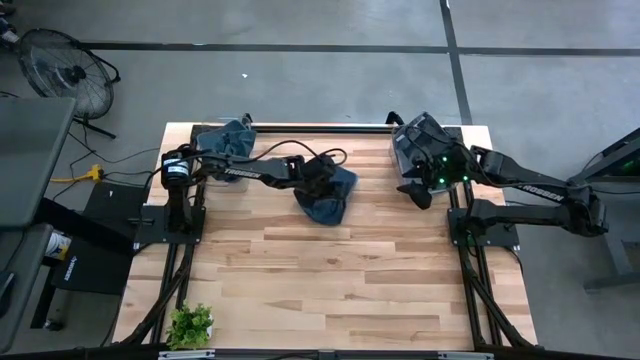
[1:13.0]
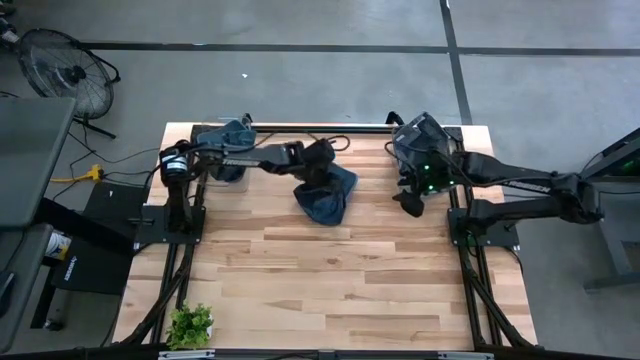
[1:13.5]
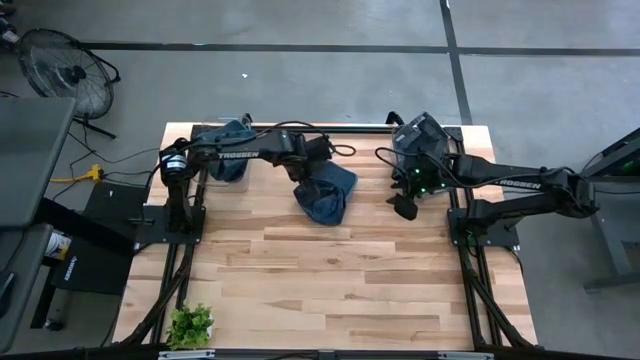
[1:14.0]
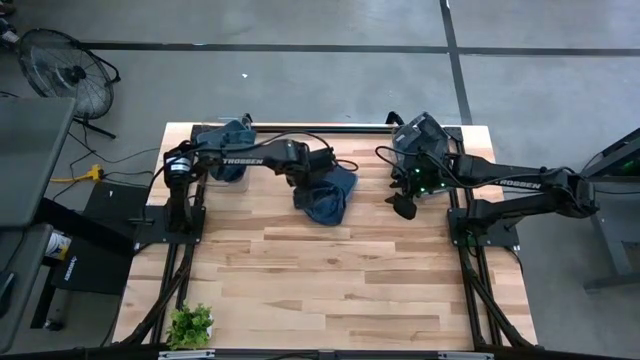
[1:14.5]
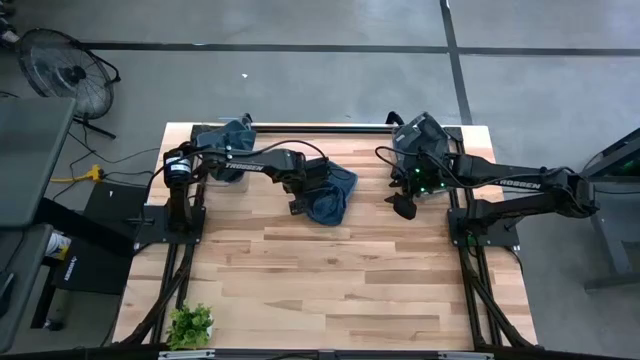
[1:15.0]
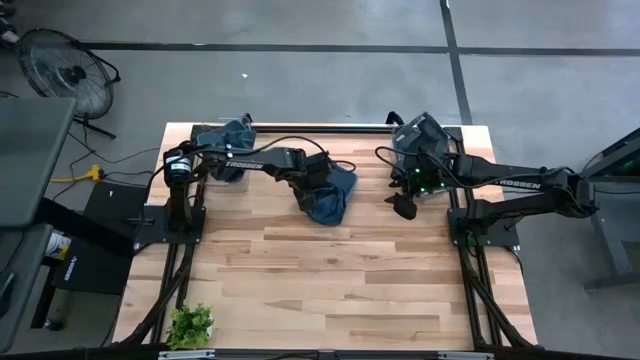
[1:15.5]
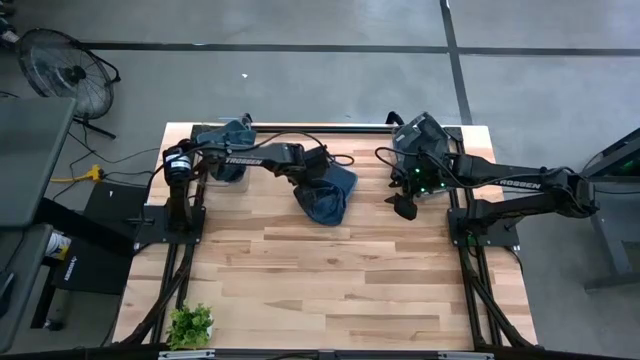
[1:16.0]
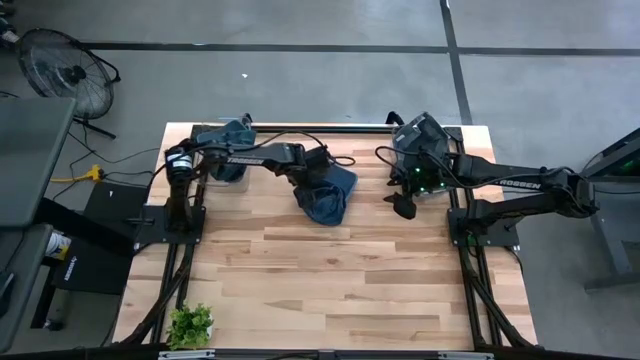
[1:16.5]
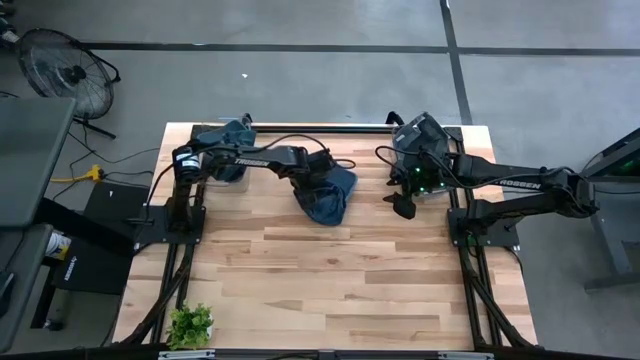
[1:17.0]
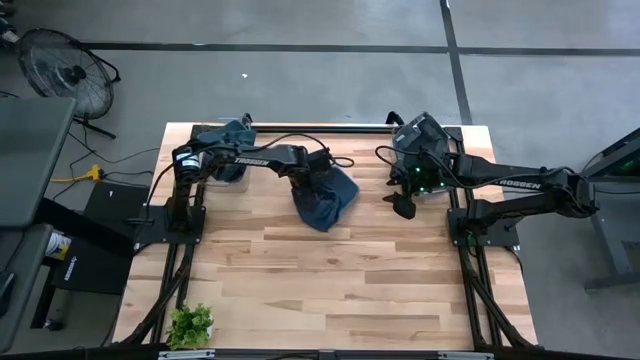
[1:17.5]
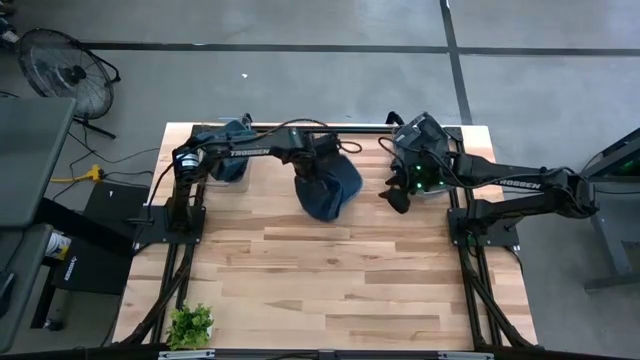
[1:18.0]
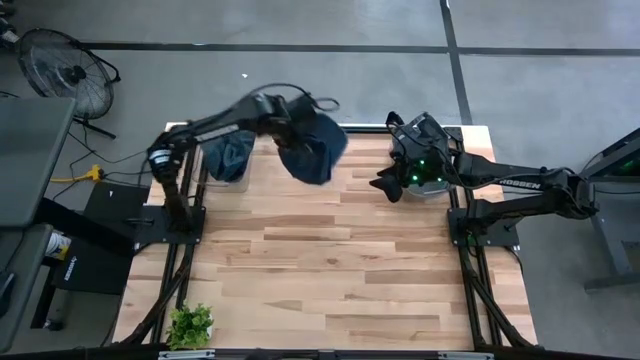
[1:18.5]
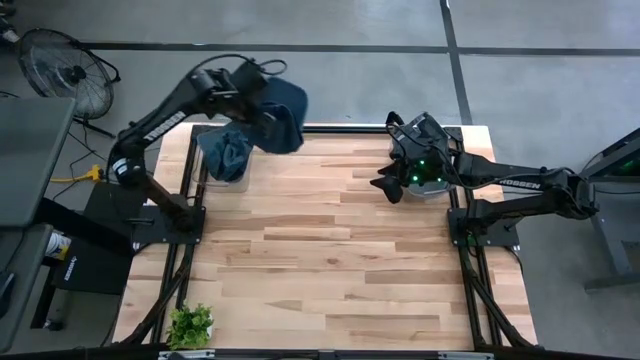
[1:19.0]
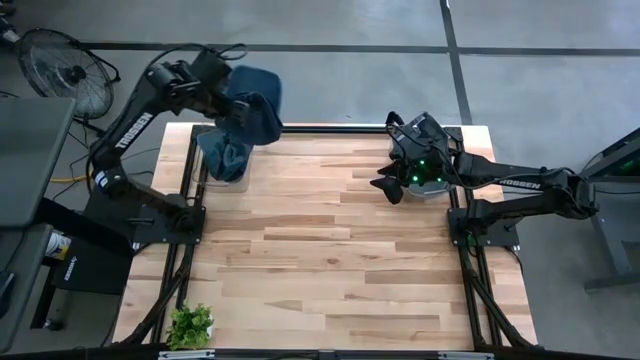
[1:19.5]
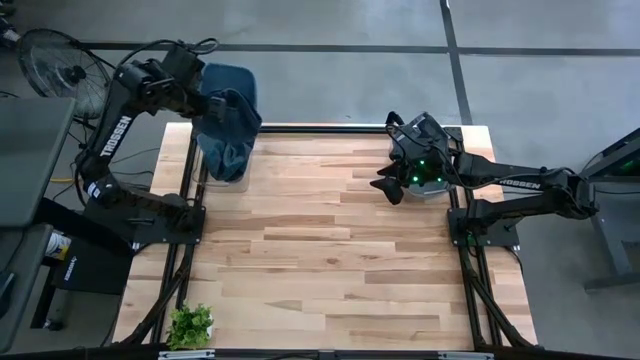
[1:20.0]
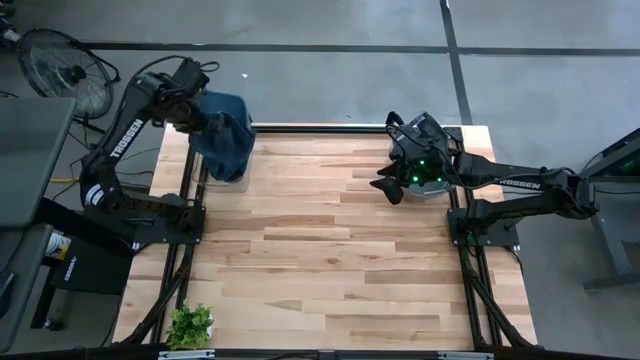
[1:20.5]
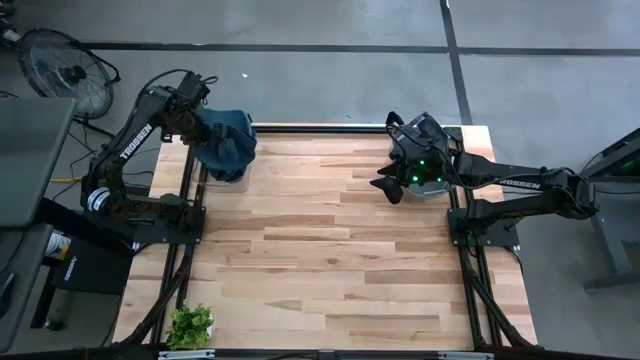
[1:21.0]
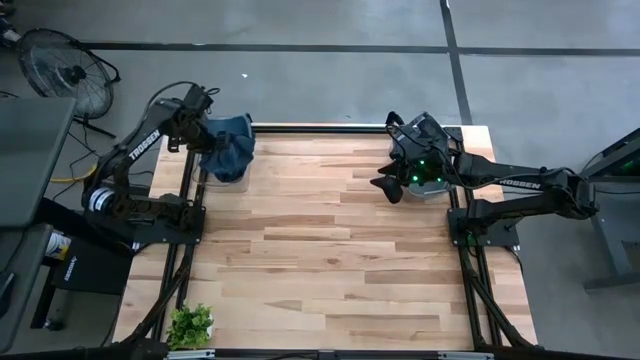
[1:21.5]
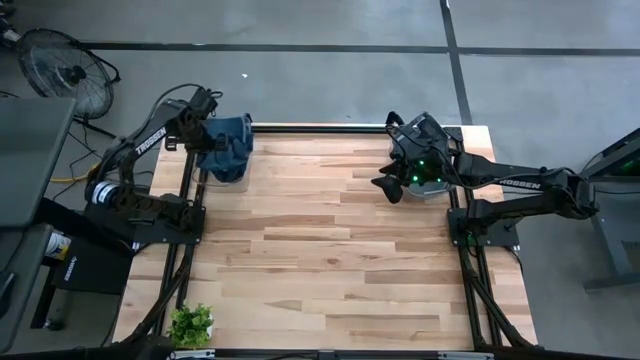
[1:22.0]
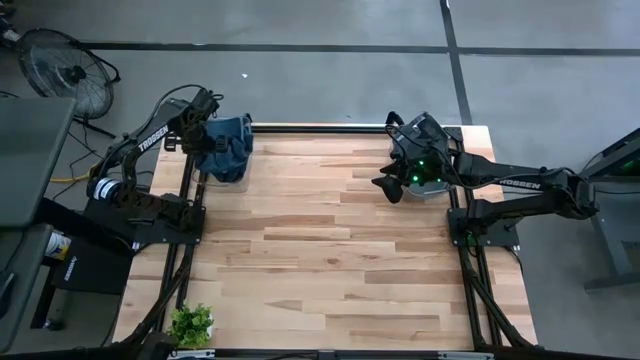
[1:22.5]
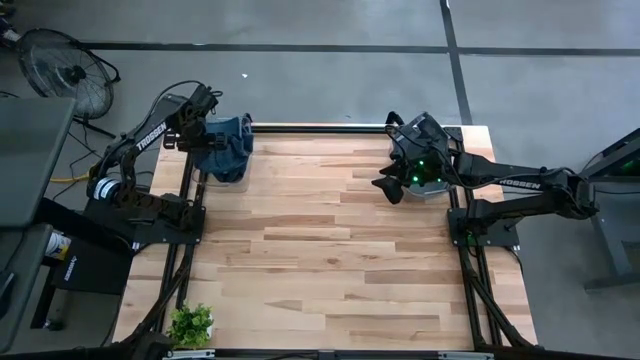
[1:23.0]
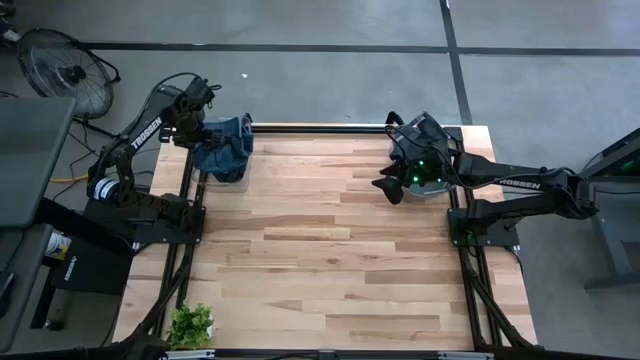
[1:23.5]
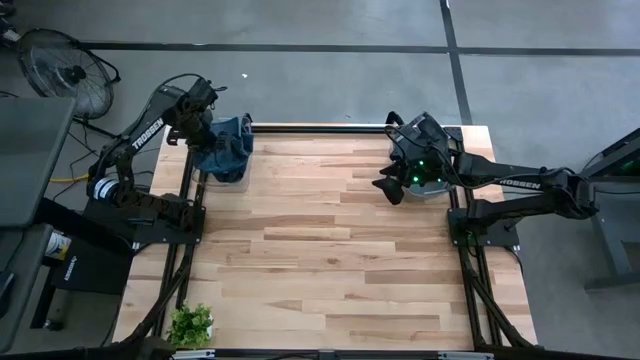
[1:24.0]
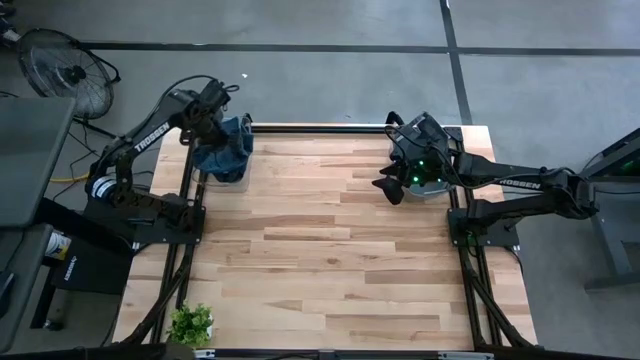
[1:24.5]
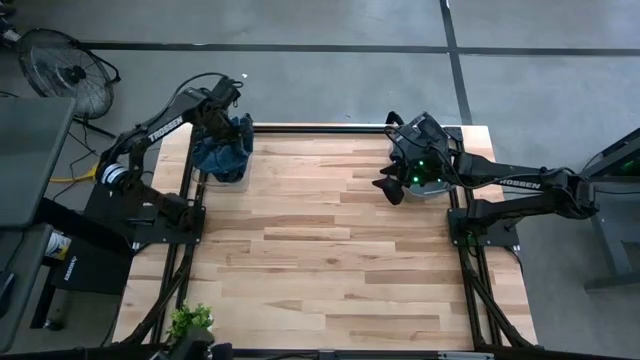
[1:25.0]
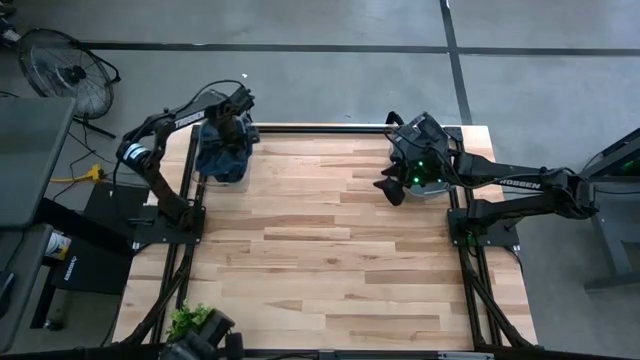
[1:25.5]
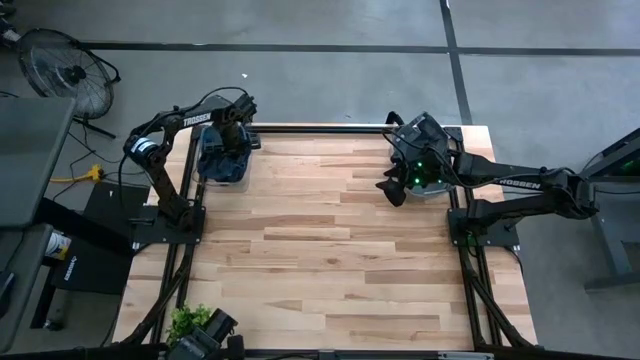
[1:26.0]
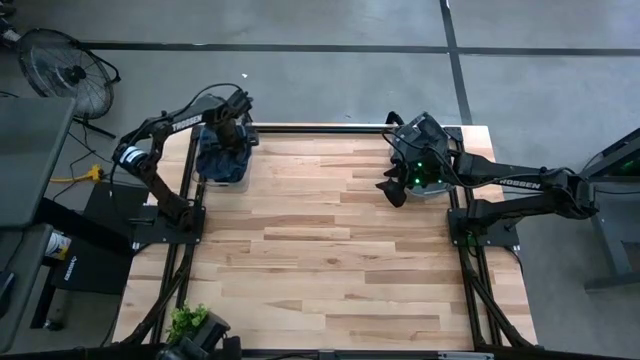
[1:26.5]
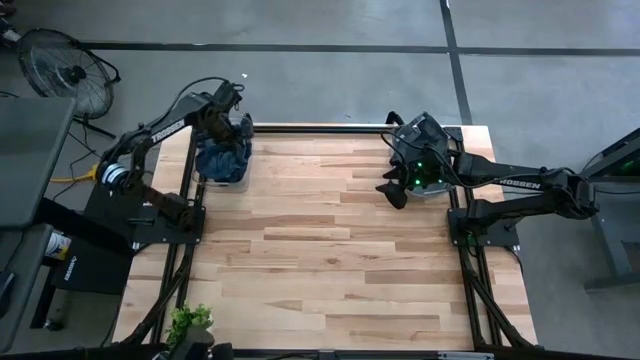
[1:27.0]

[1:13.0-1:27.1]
Task: Pick & Place hat
Put the blue cap into the left transparent bin

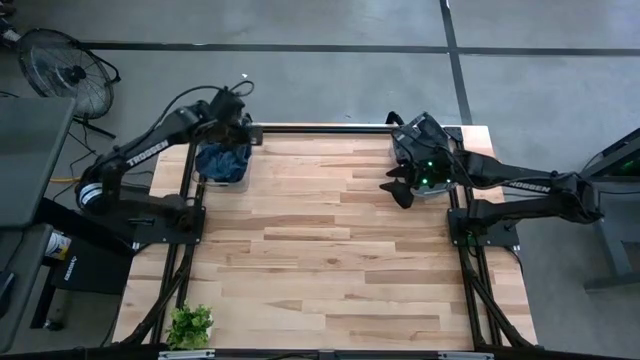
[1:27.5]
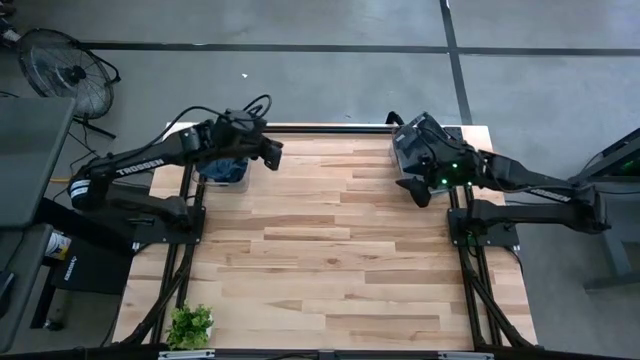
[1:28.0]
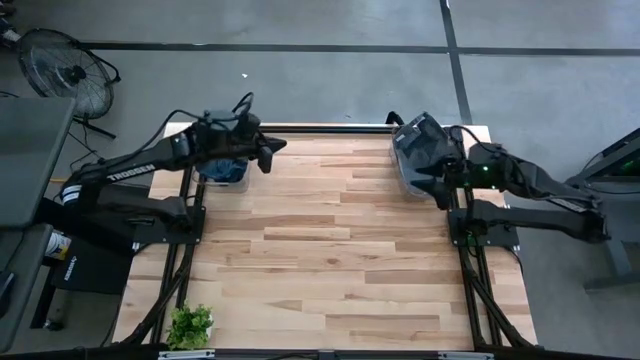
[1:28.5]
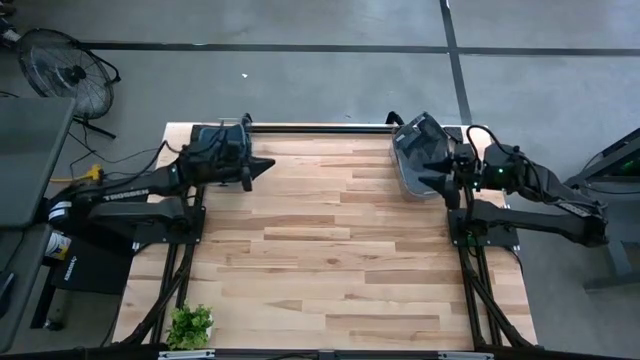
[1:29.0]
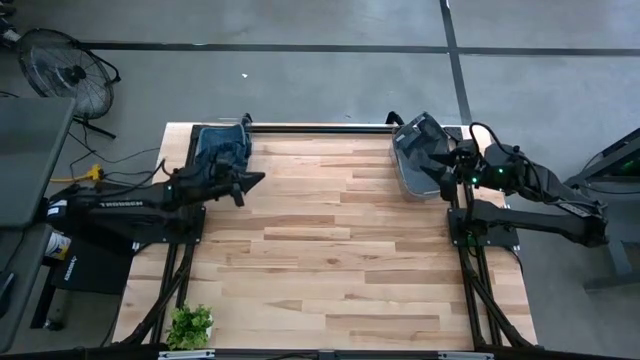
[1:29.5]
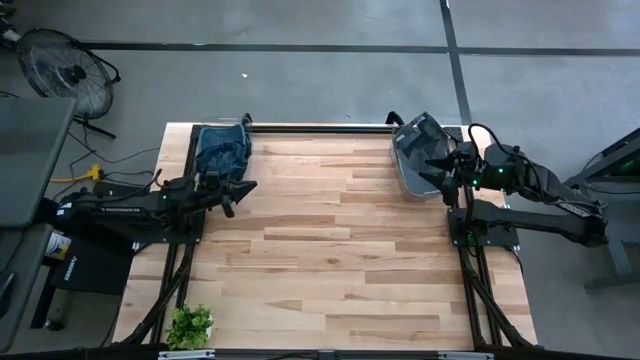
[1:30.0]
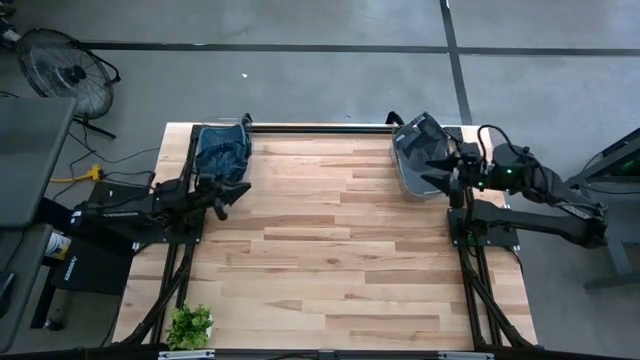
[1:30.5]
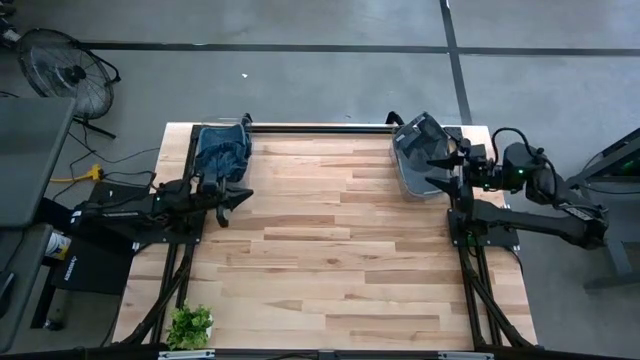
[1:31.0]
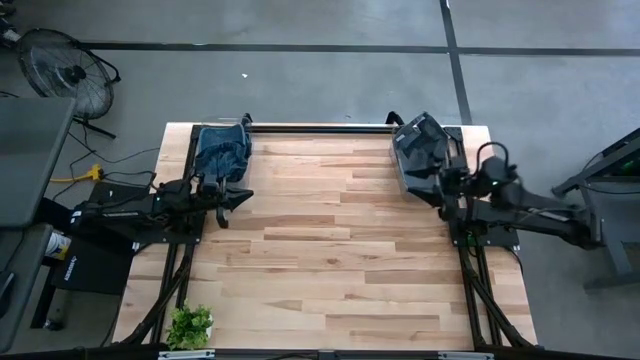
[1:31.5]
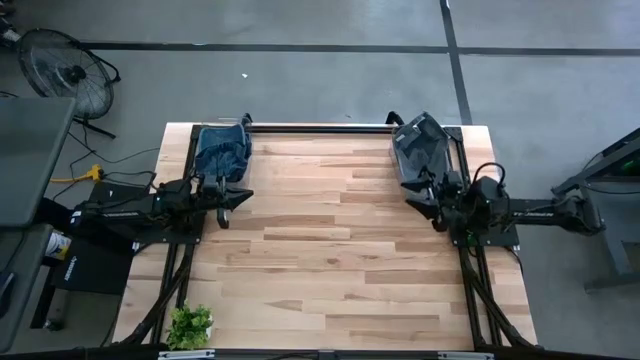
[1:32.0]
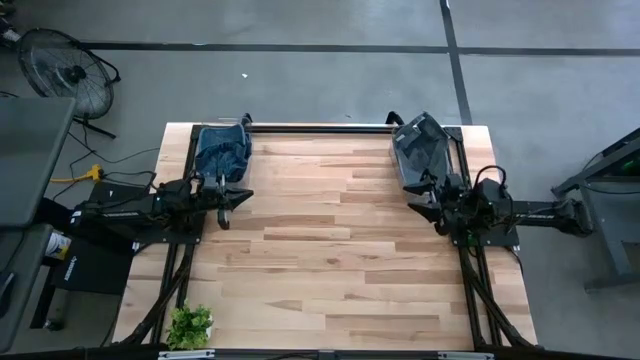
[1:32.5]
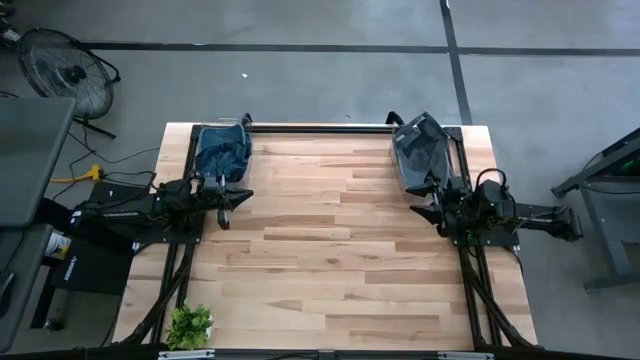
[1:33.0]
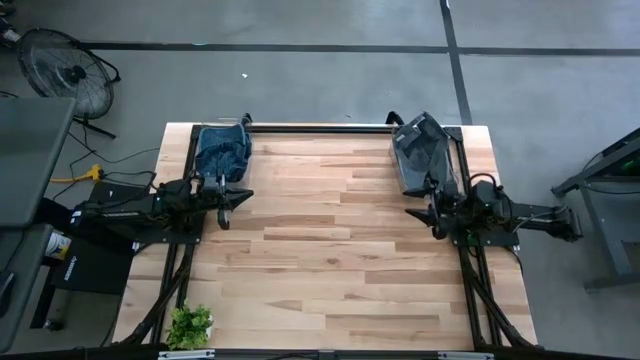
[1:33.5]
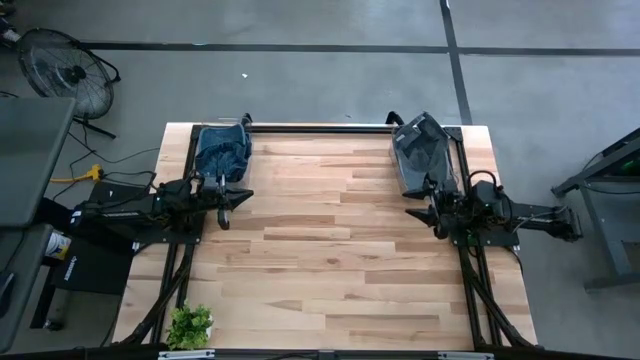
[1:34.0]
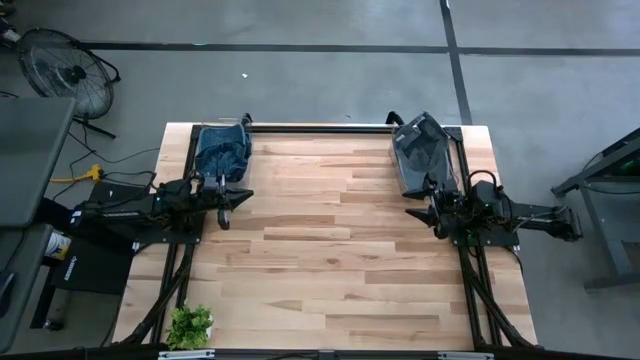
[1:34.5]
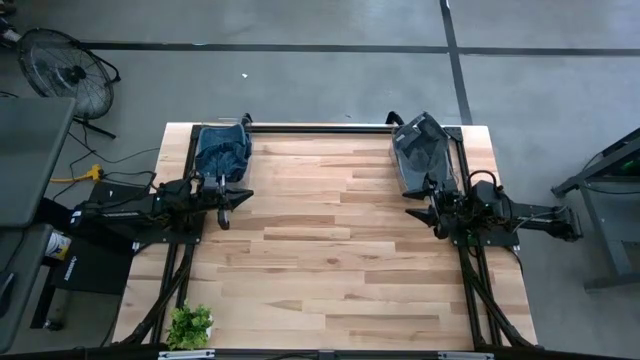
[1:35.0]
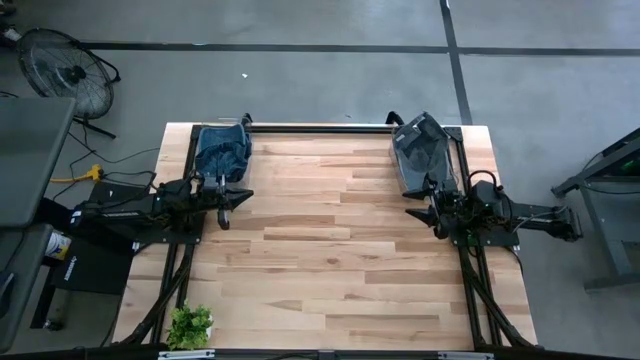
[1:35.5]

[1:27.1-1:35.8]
Return to Home Position
